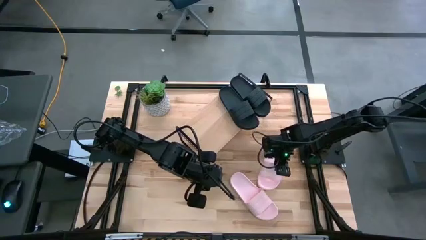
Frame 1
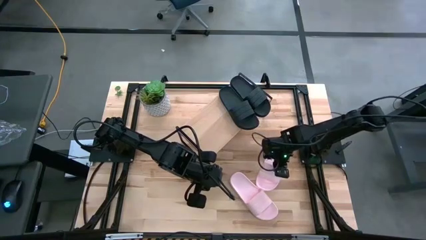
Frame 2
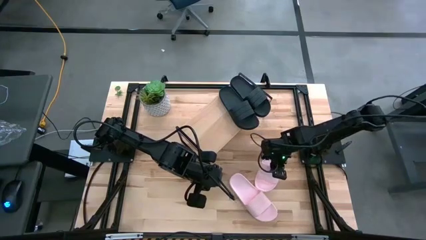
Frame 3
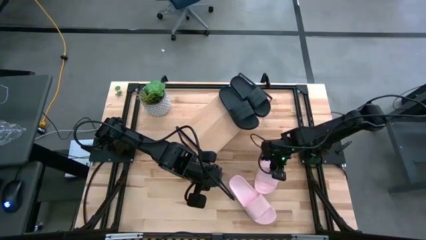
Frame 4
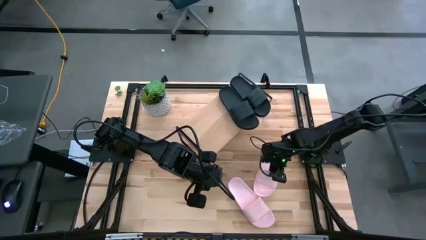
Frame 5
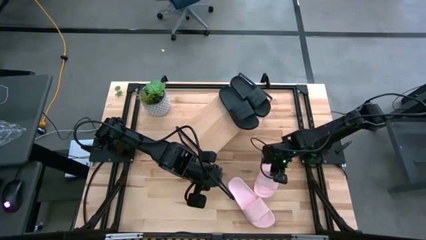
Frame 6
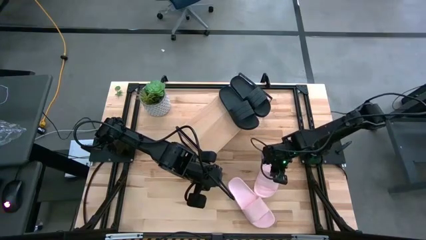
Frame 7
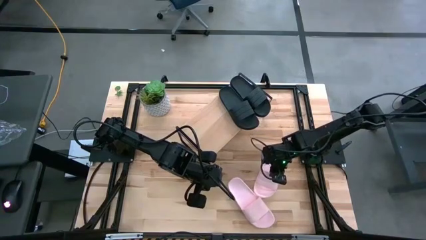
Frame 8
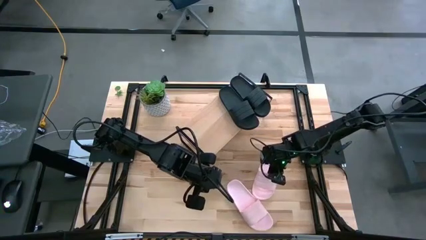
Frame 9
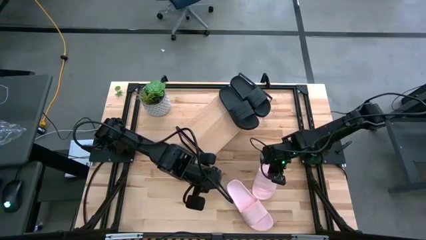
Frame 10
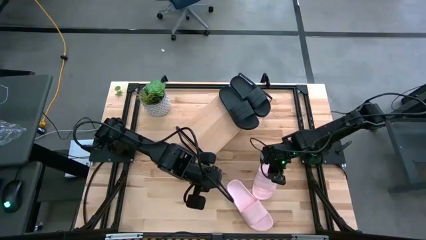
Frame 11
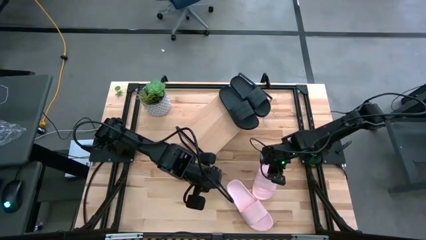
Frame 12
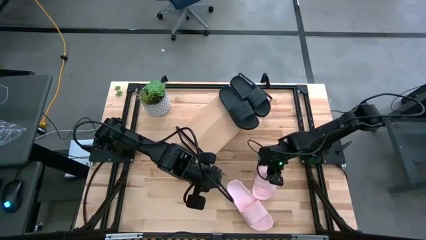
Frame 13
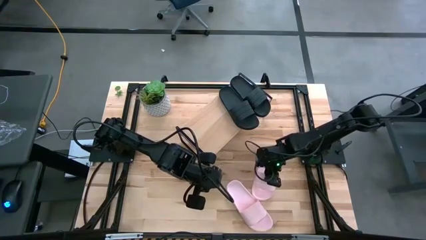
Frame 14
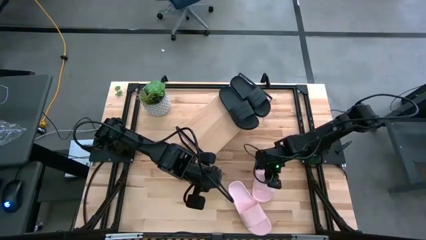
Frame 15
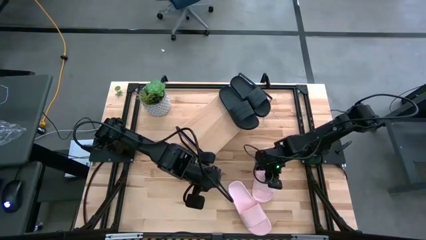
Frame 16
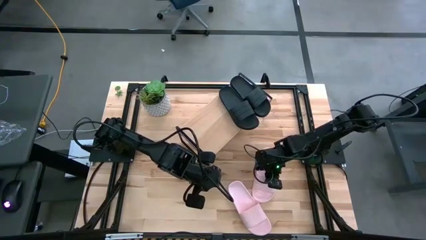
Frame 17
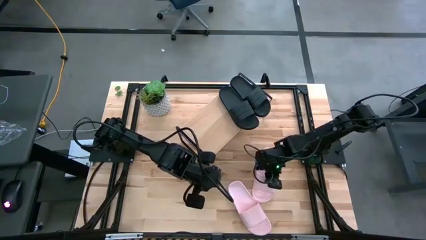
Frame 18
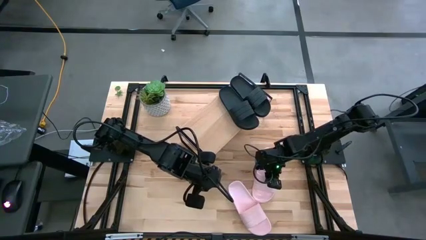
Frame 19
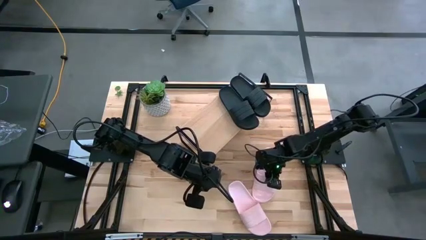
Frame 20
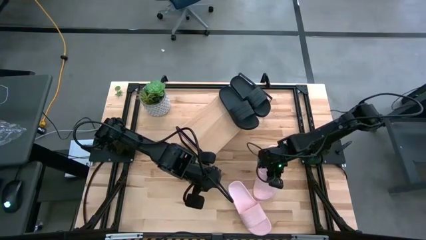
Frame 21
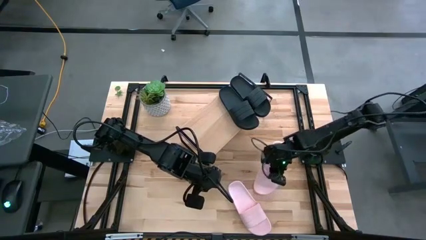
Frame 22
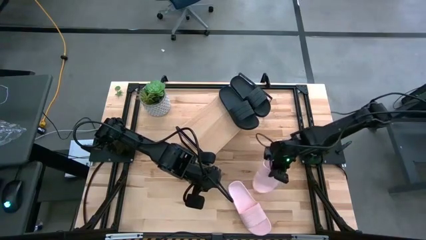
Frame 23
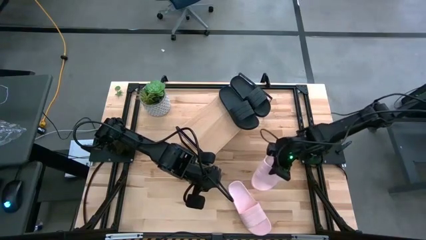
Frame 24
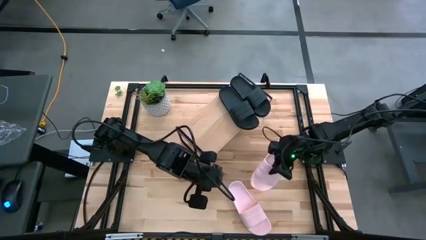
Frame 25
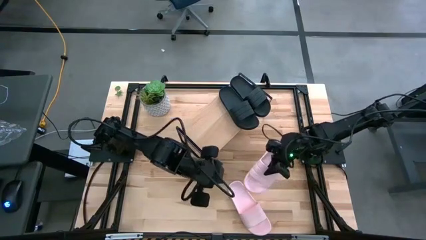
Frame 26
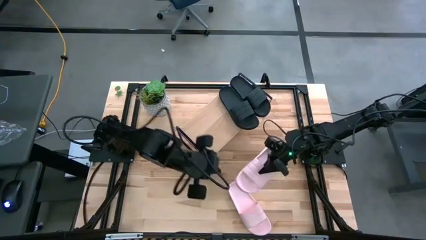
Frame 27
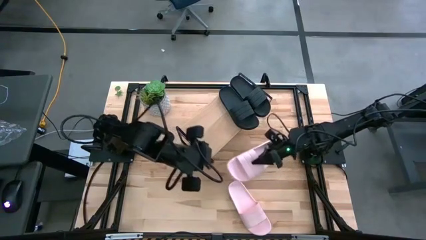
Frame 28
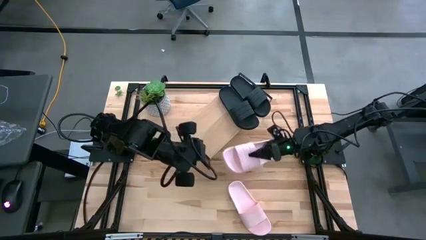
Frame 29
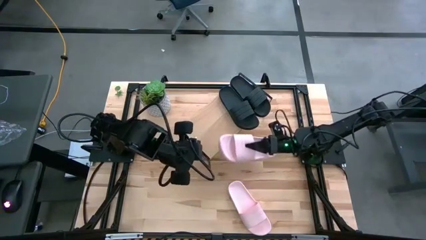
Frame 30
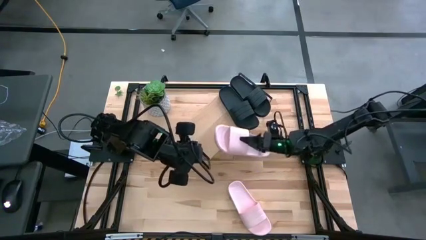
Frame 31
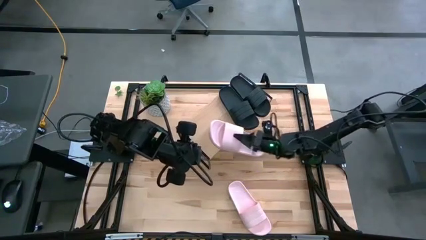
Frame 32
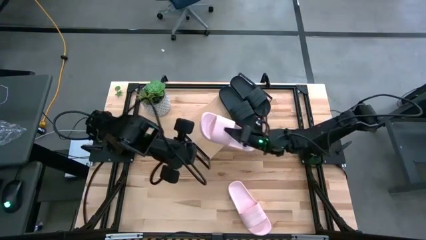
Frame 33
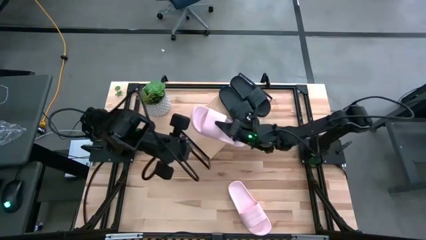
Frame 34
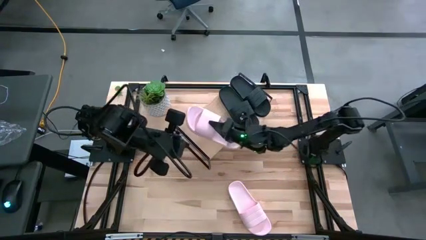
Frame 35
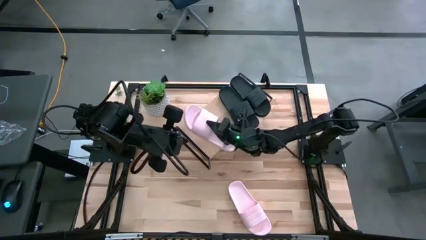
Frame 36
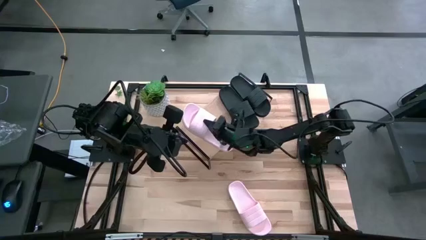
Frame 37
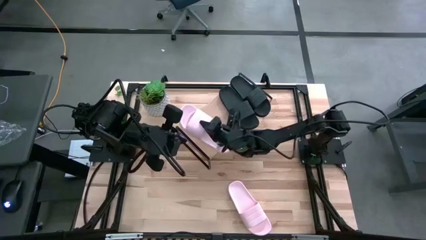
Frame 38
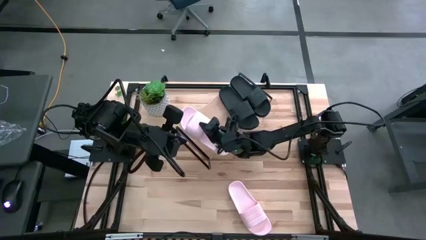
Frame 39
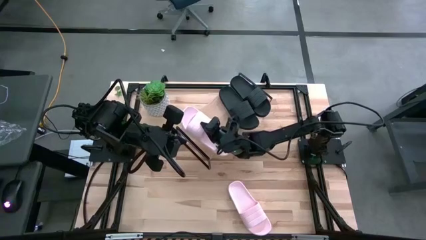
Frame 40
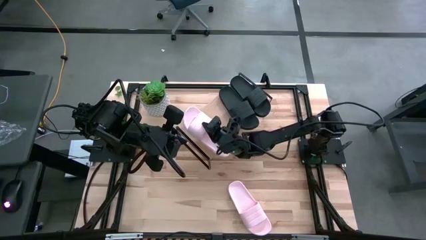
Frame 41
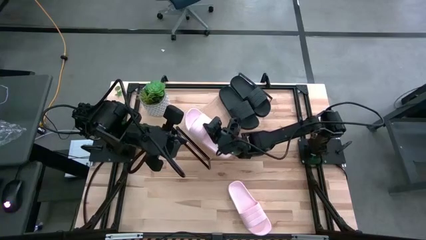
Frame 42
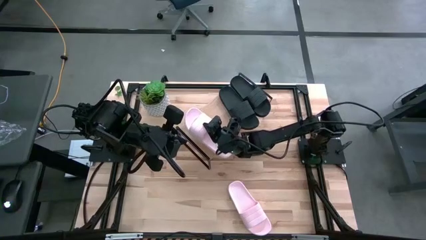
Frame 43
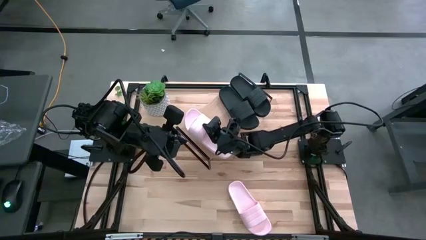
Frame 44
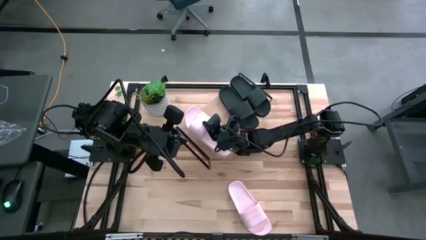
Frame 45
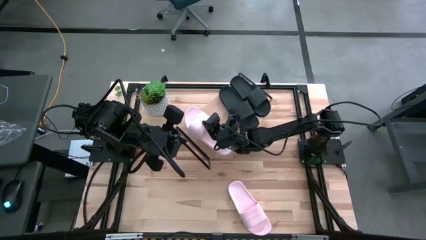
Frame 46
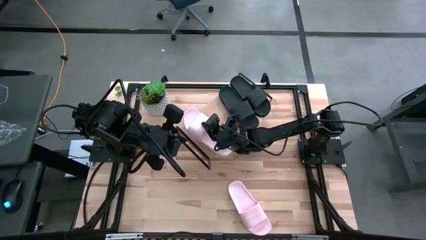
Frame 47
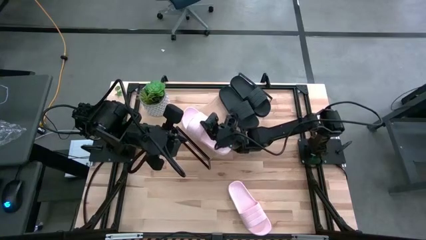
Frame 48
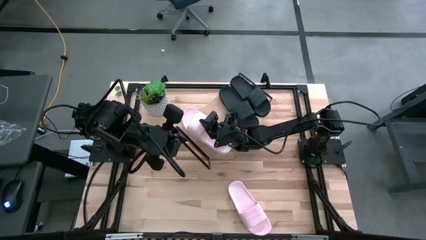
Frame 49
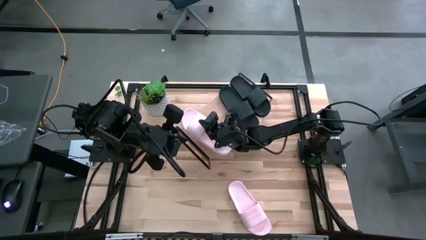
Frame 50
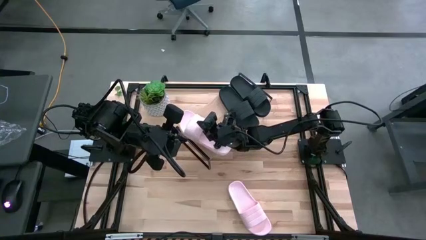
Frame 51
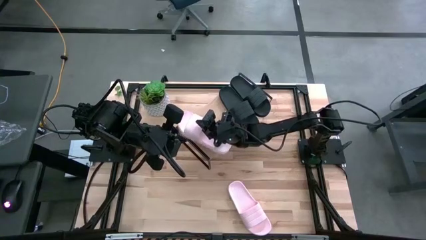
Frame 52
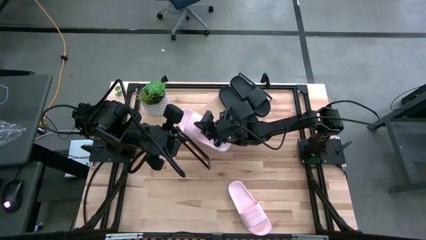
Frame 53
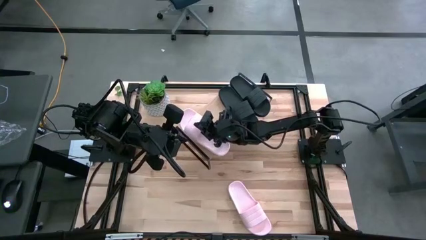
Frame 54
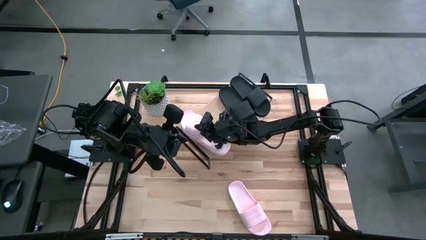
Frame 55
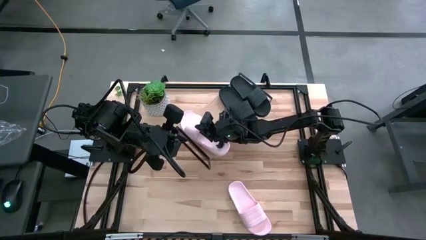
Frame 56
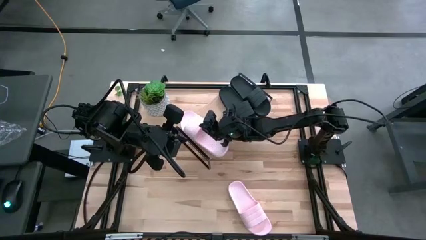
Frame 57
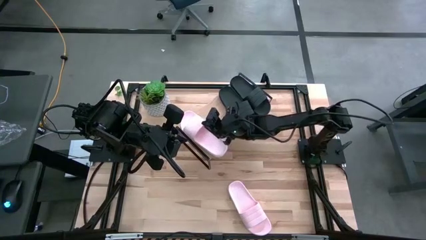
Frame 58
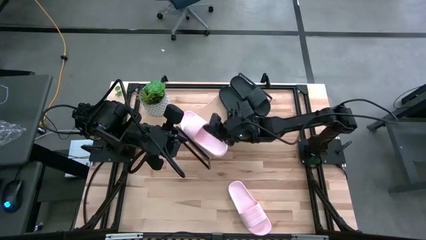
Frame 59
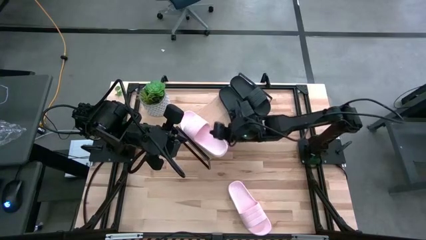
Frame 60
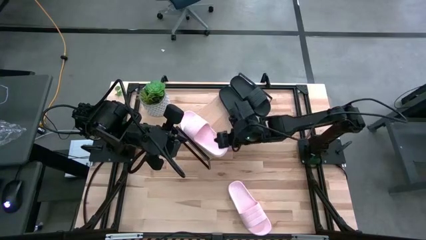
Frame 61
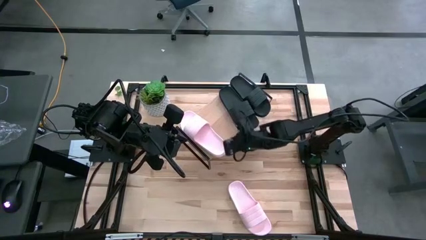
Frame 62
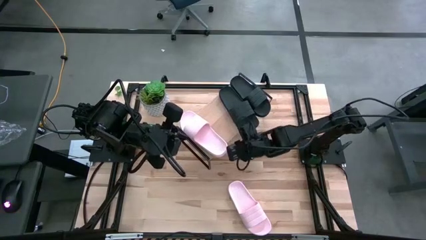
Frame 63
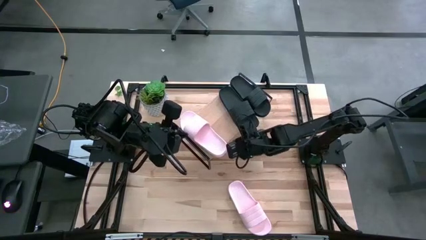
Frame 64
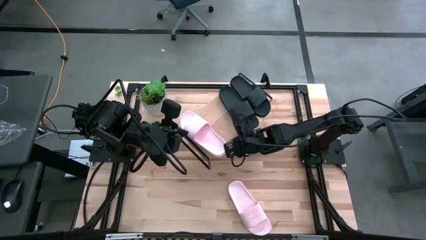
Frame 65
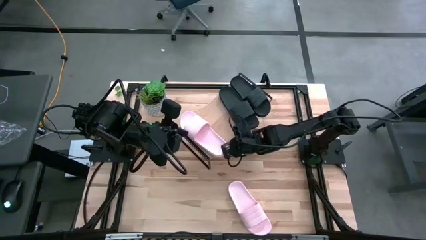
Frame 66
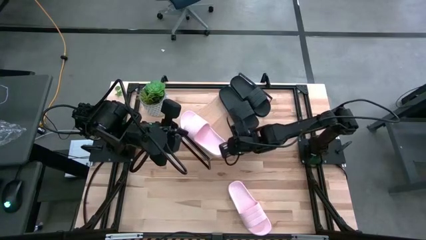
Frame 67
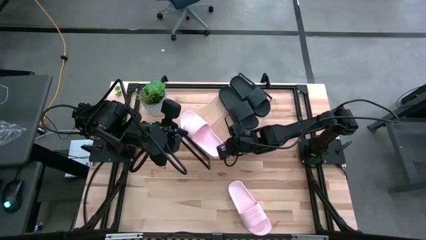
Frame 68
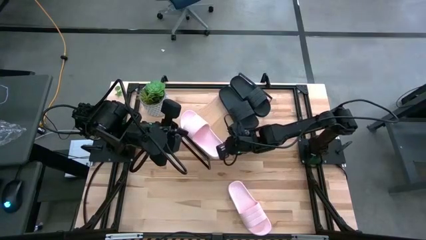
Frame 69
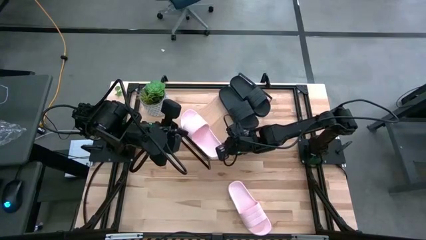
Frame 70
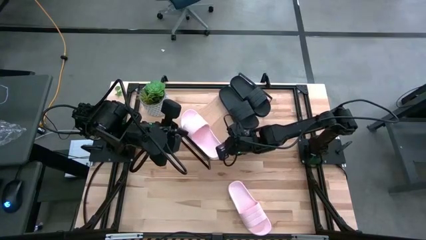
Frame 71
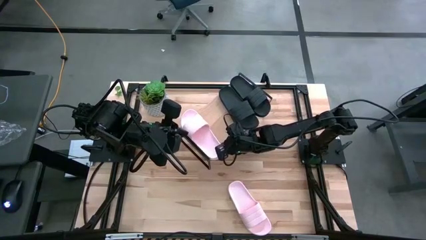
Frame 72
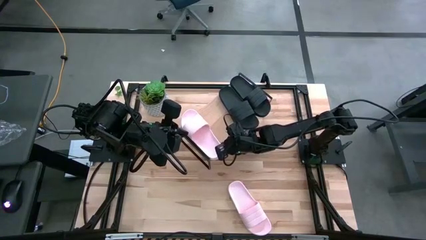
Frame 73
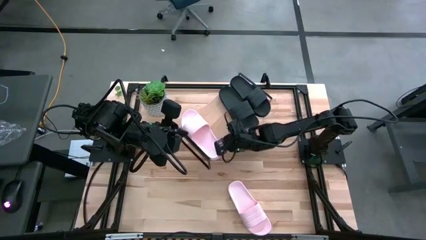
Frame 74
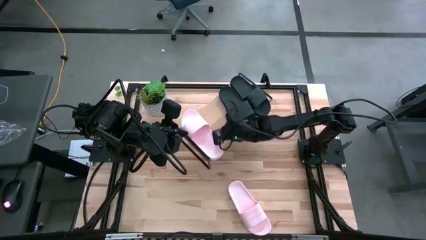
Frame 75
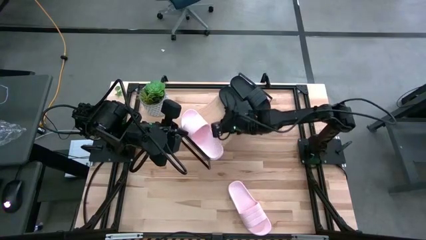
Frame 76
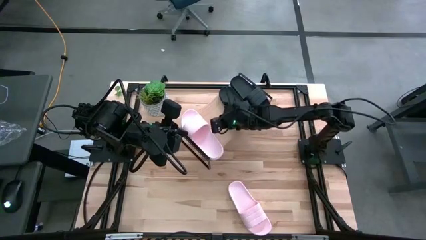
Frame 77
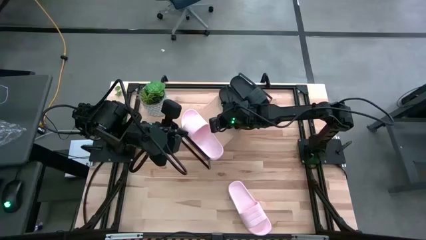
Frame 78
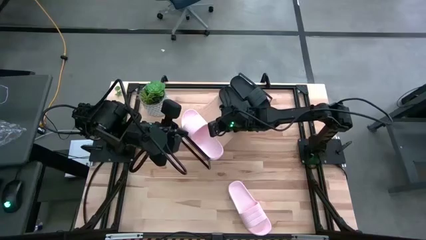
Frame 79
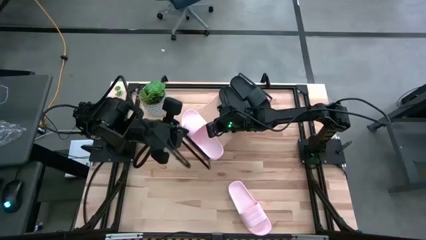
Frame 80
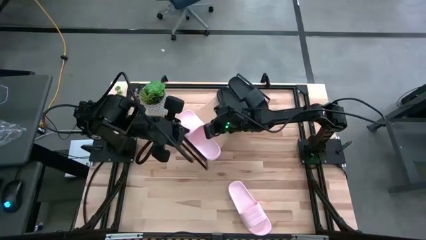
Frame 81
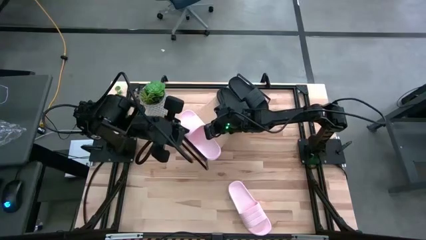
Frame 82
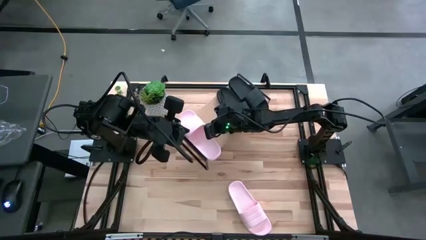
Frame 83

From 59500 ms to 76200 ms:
Task: Pick and place slides into the shelf
Put the top pink slide on the shelf

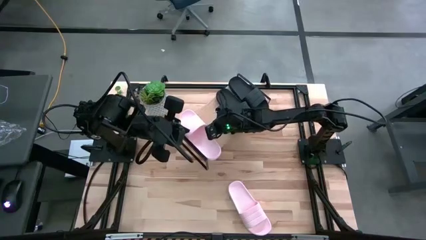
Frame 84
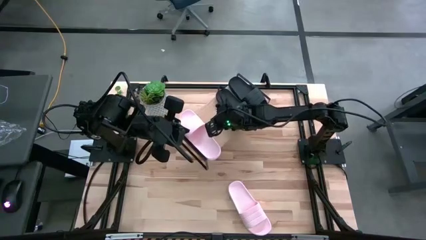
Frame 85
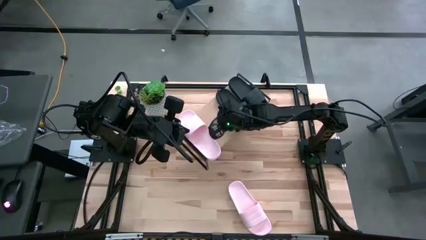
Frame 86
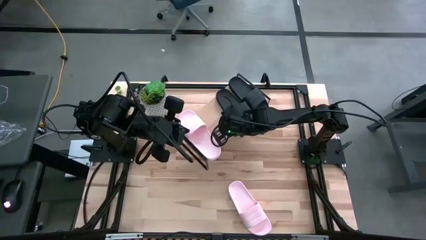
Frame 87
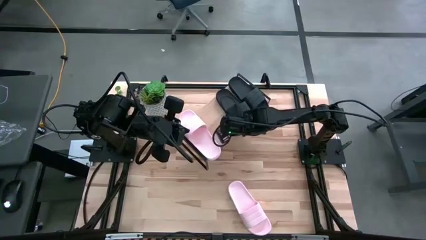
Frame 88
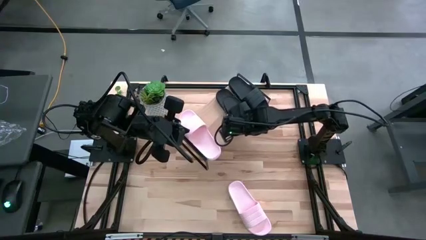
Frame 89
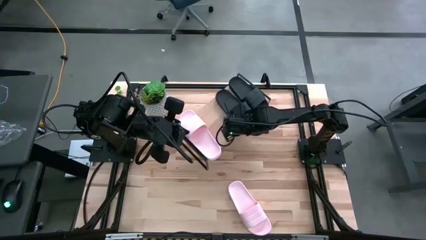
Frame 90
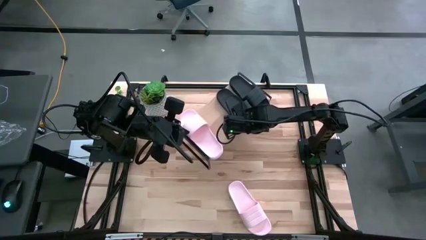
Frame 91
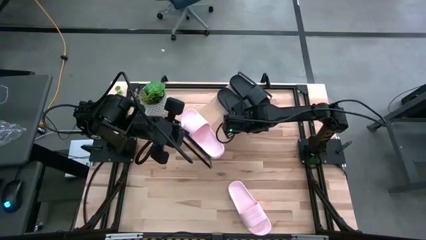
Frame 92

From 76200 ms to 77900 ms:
Adjust the left black slide on the shelf
